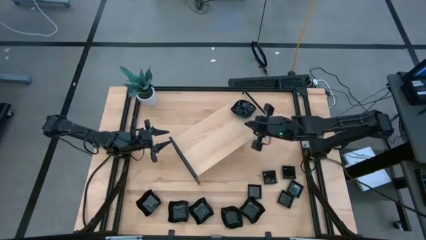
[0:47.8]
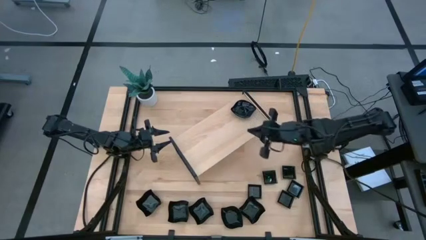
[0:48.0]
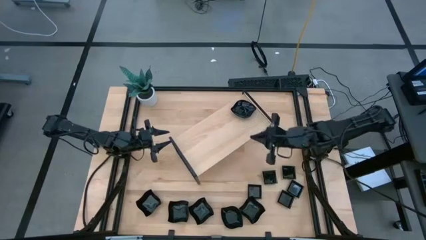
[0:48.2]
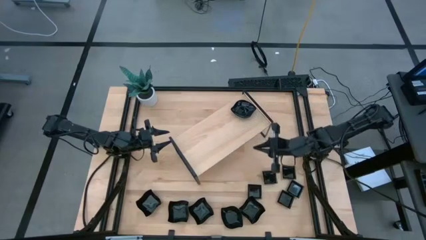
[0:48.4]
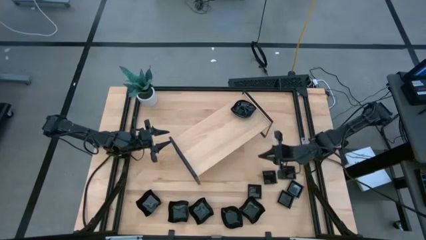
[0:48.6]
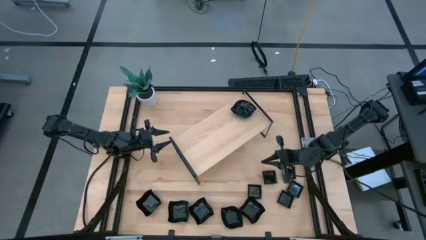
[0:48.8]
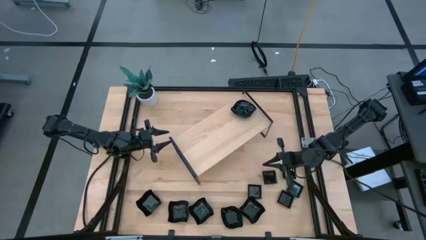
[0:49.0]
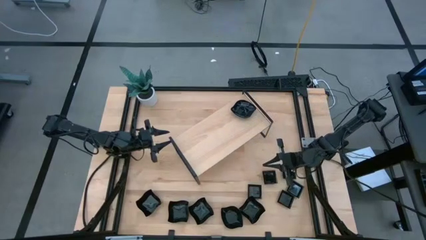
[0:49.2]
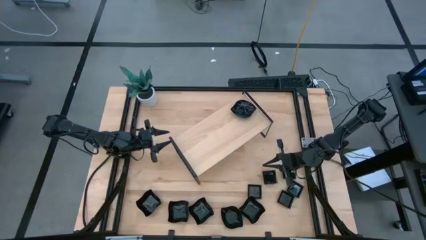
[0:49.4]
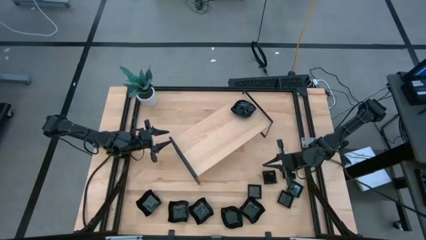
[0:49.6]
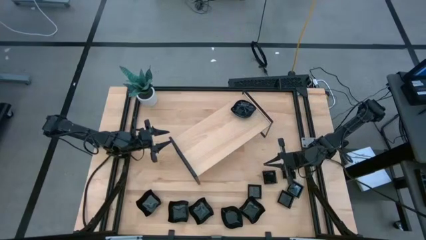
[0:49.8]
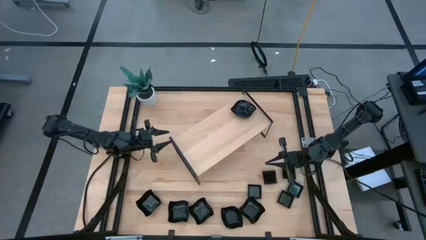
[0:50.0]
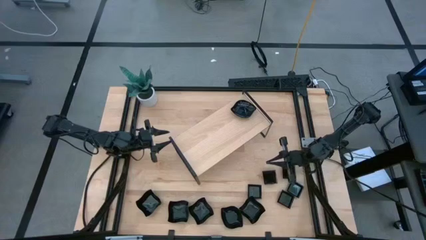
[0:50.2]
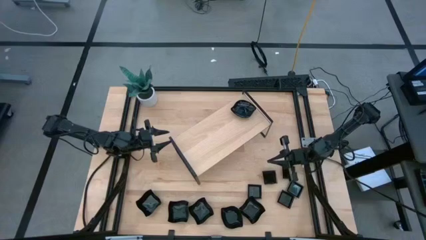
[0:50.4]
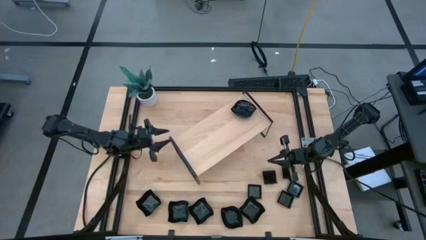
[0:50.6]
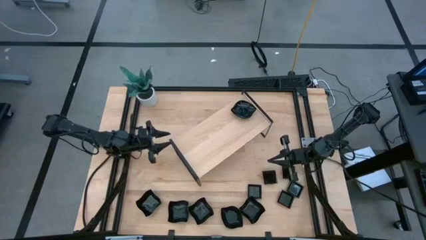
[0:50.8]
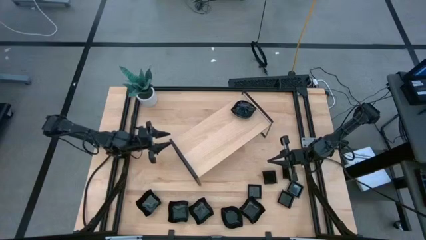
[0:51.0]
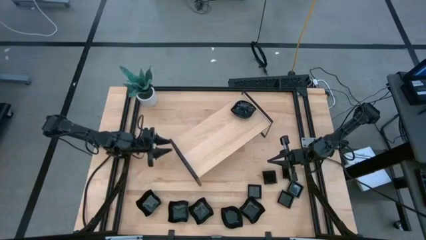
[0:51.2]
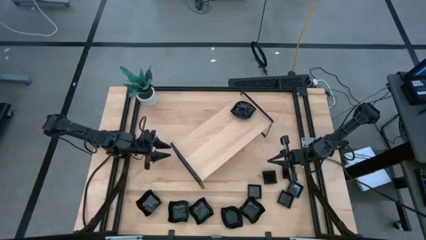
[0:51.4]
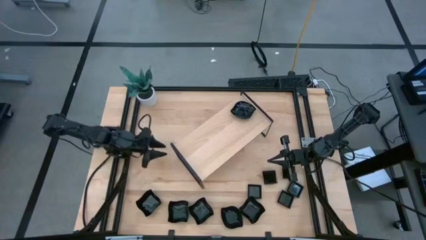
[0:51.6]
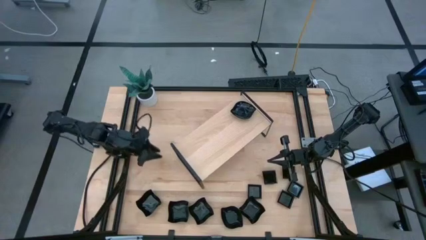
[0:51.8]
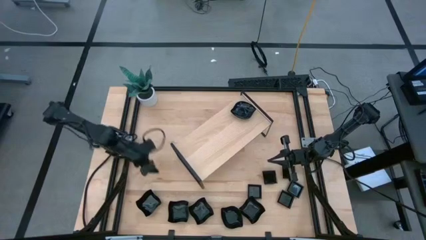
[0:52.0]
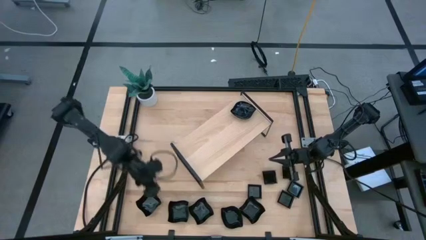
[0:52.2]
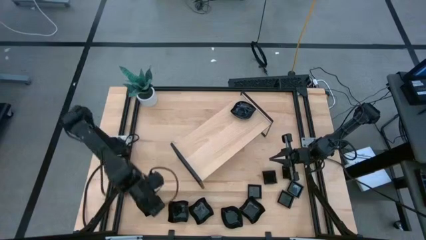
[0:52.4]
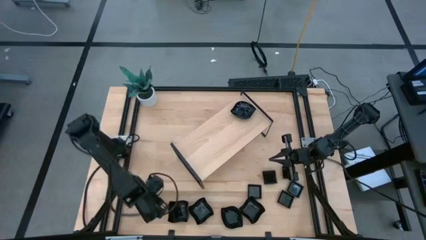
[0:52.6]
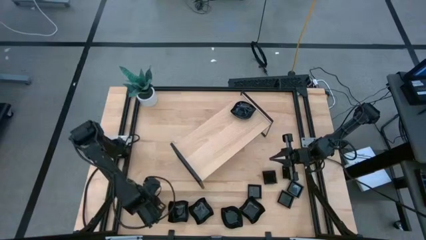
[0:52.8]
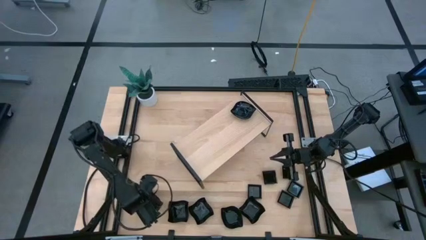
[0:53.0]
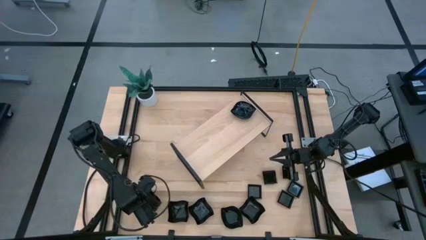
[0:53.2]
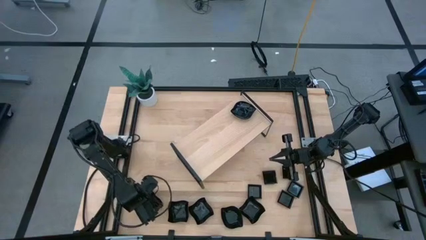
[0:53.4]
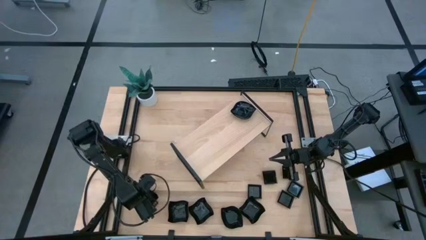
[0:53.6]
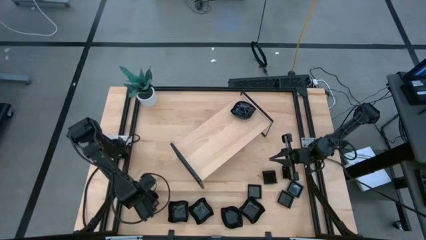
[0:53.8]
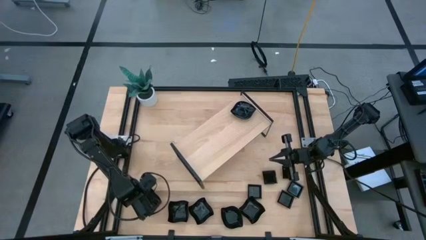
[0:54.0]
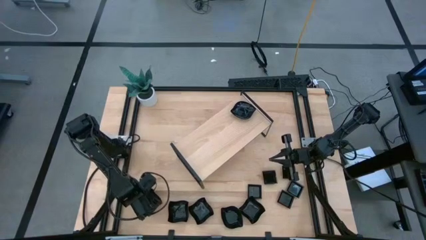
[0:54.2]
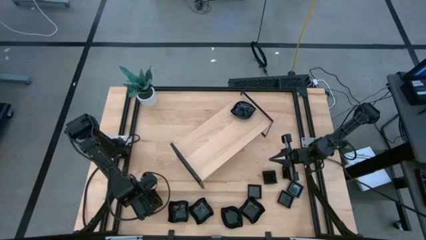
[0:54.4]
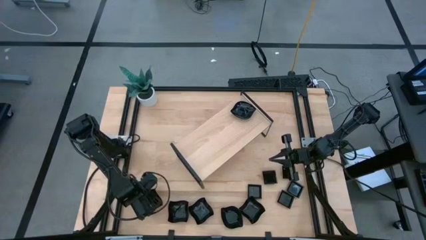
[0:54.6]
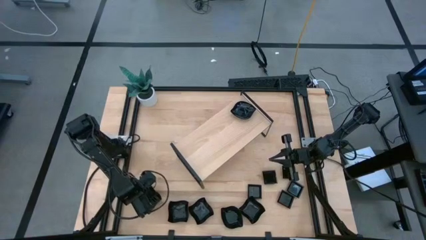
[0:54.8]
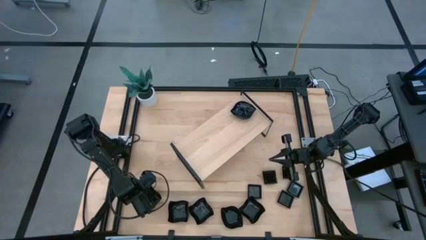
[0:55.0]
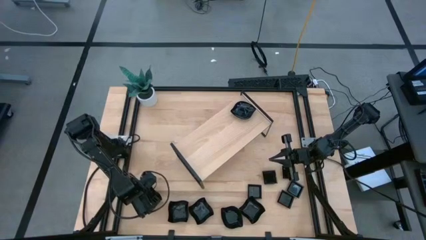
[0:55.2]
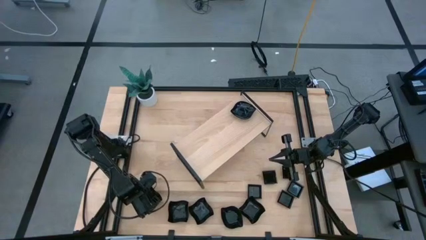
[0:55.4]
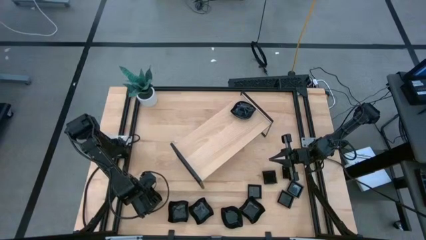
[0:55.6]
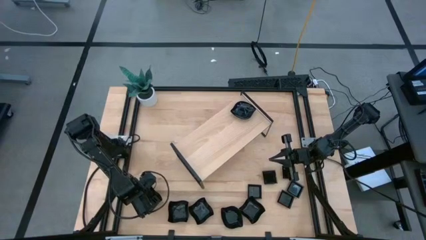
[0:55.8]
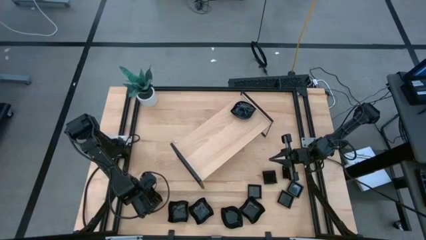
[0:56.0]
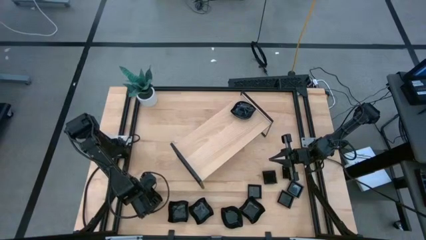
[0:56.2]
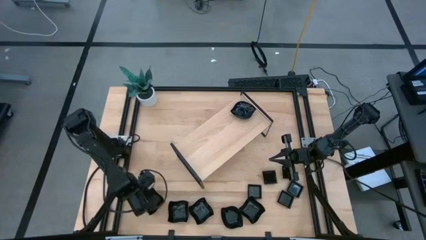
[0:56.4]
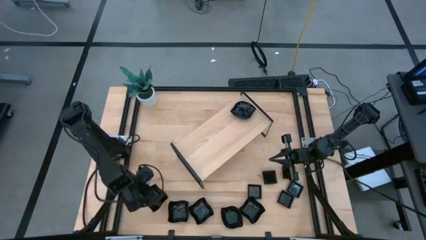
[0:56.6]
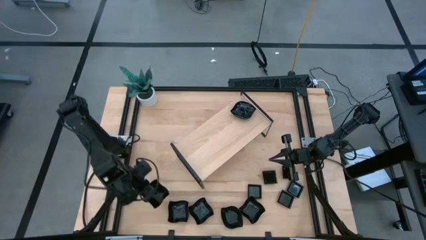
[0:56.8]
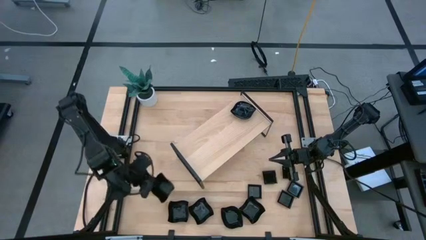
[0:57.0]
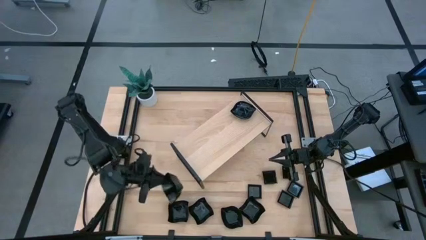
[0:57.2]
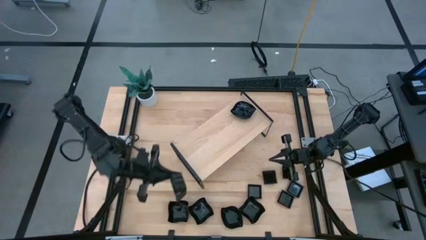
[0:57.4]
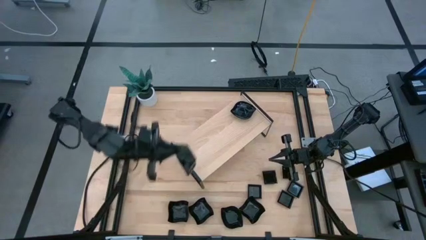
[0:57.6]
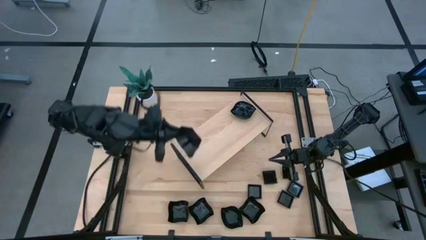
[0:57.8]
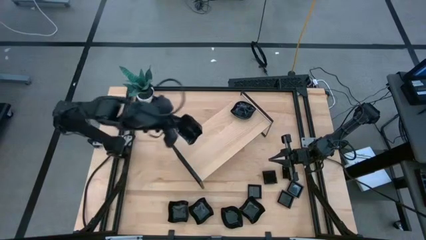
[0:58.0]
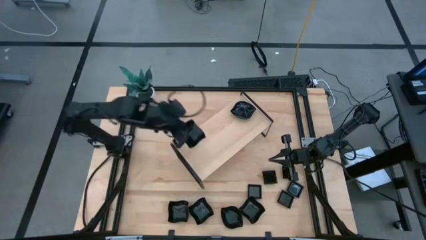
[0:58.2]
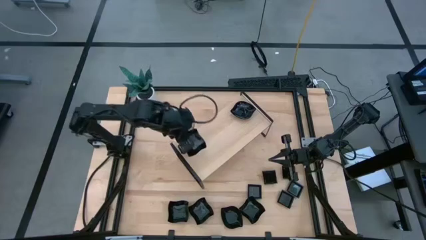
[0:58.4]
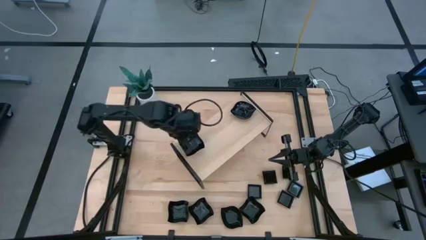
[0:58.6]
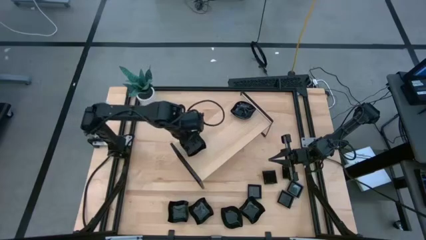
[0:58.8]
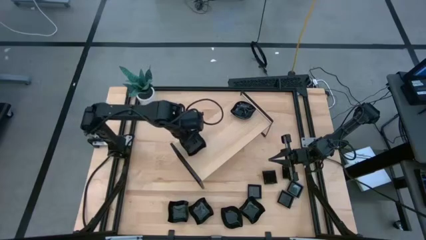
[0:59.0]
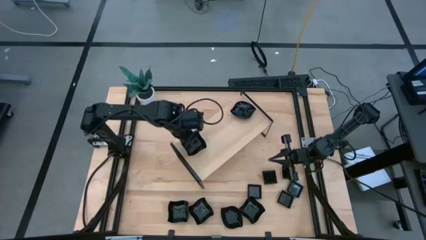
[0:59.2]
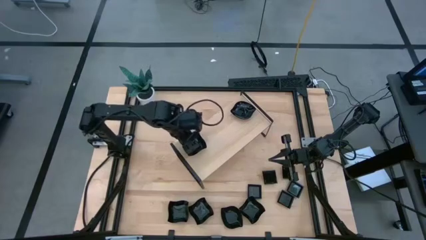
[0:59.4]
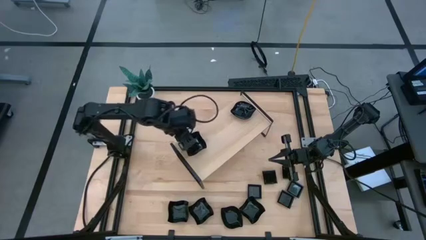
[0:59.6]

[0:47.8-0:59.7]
Task: Pick & Place Mini shaped plates
Put the distorted square plate on the shelf

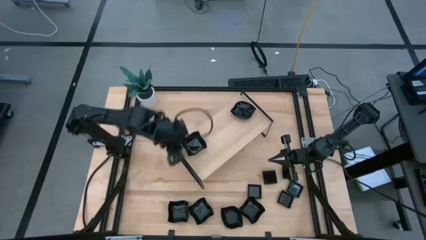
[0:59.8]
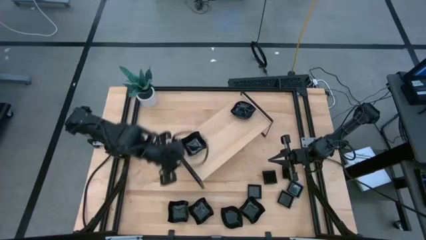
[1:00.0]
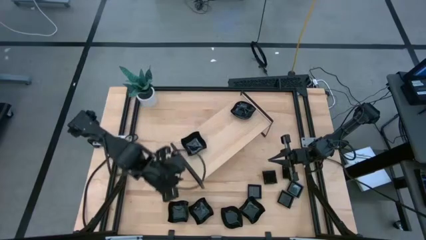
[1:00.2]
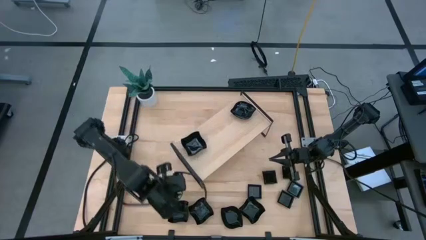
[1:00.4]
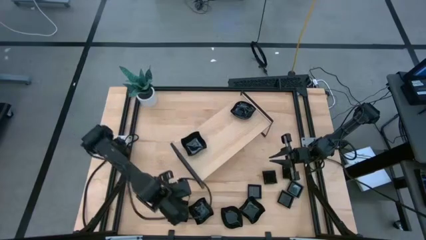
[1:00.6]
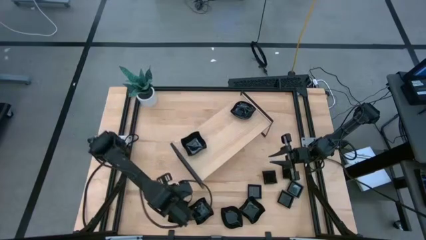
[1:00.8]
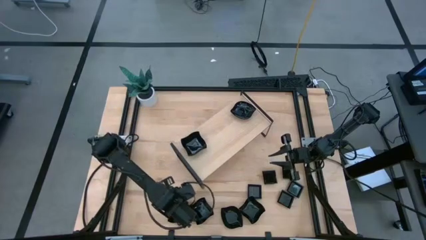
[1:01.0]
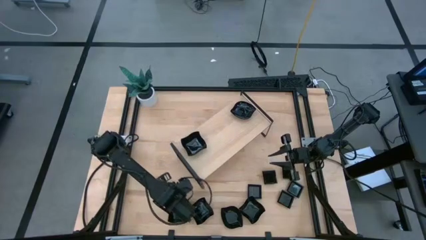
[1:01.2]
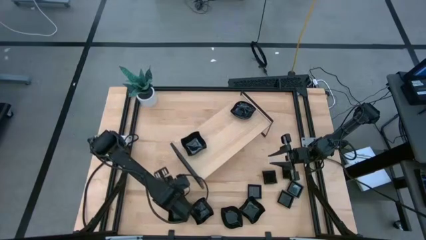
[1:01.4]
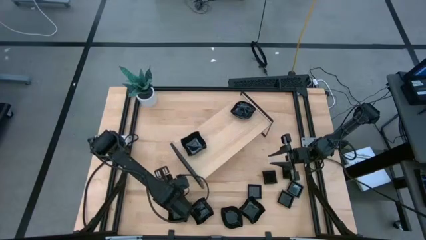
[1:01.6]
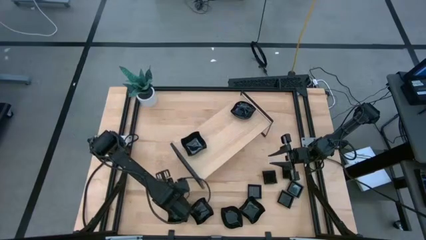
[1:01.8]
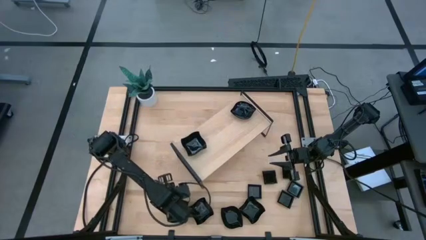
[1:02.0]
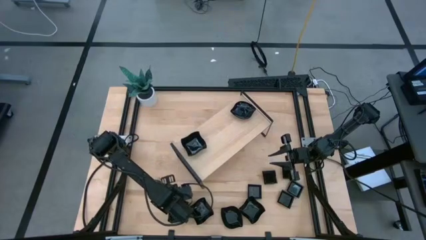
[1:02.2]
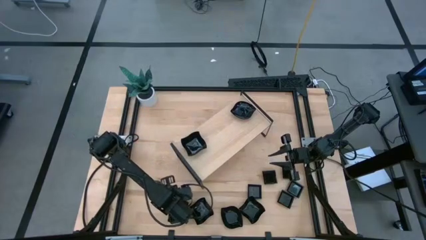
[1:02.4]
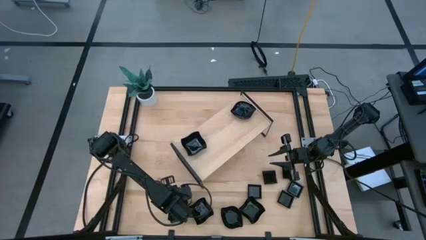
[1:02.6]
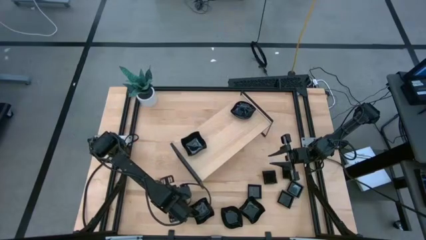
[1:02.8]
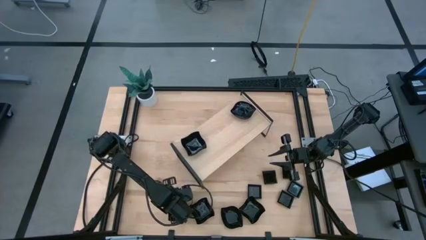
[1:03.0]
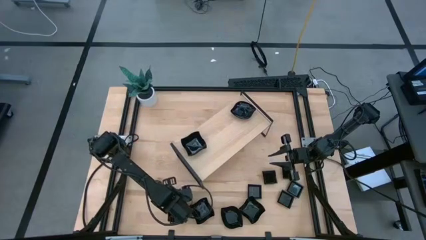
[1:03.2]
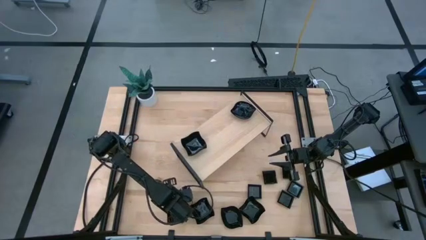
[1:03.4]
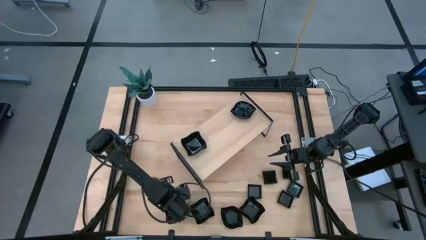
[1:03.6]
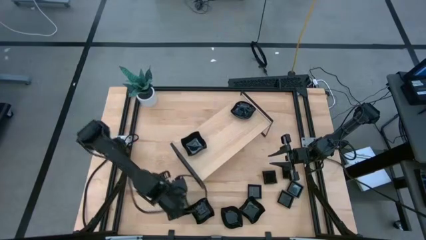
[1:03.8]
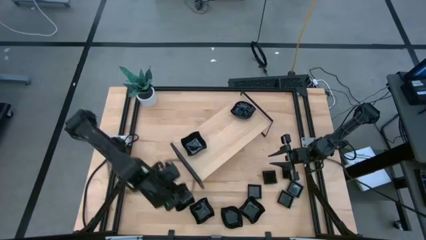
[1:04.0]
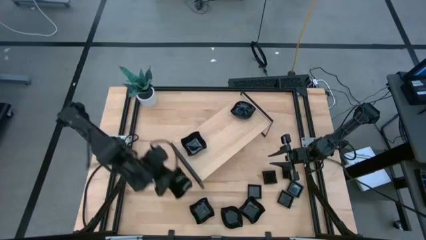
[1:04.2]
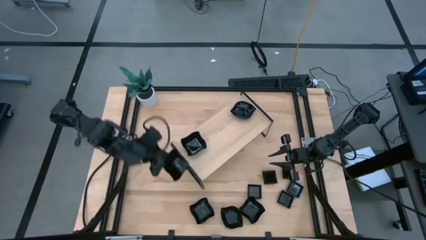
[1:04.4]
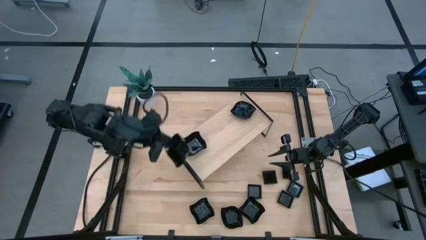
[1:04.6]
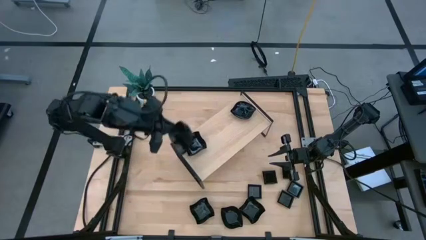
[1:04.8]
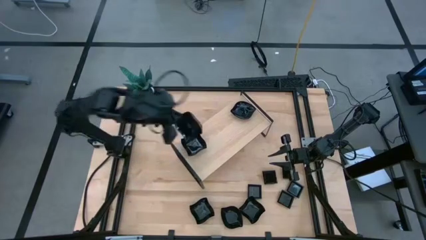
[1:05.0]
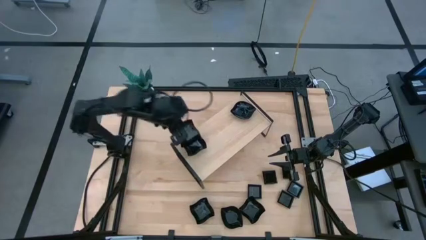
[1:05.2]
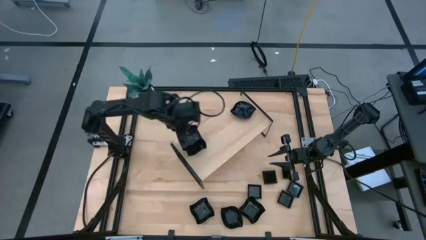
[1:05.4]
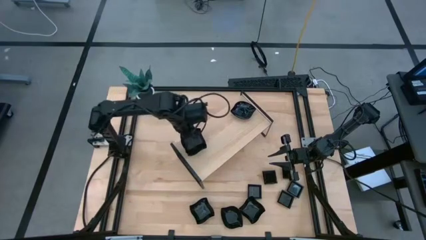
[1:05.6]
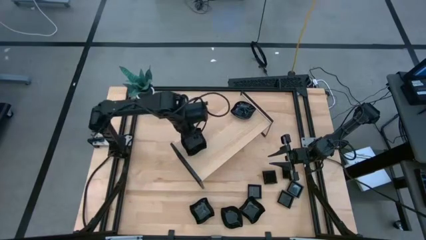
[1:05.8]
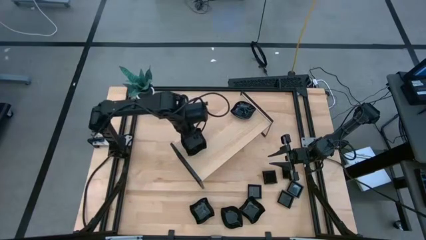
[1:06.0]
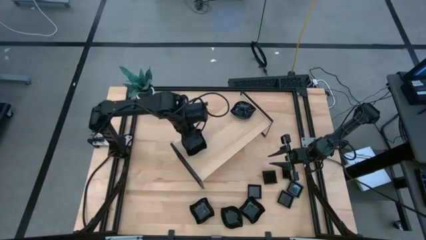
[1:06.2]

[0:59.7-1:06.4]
Stack the distorted square plate on top of the other distorted square plates on the shelf
